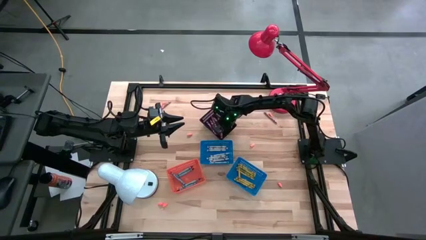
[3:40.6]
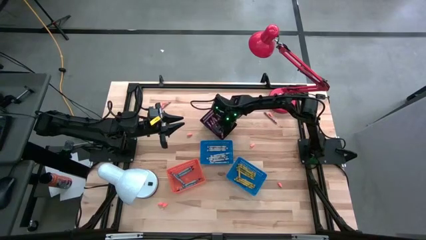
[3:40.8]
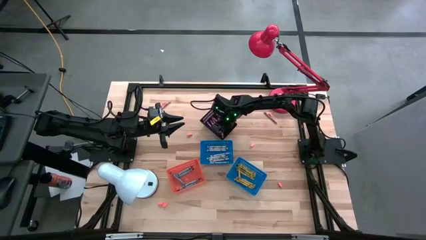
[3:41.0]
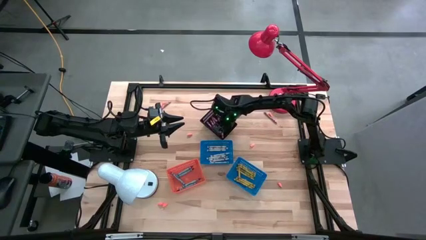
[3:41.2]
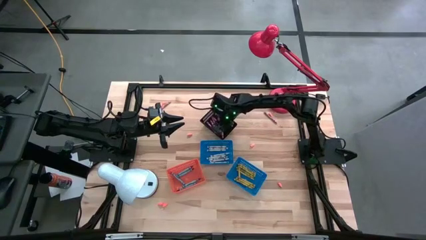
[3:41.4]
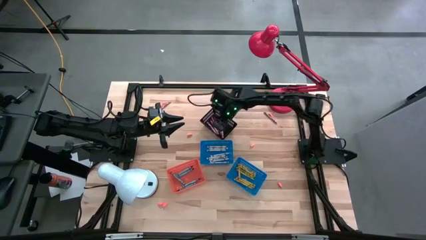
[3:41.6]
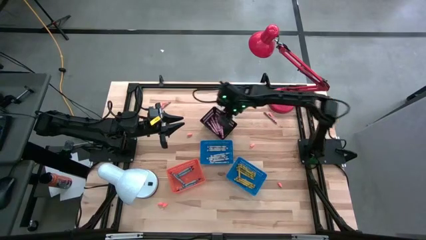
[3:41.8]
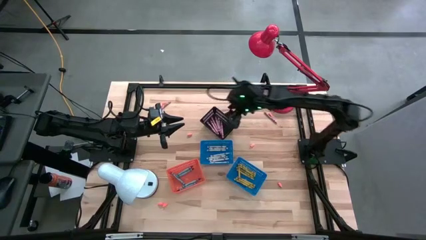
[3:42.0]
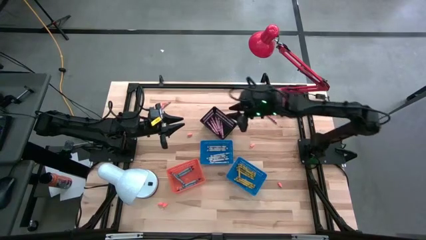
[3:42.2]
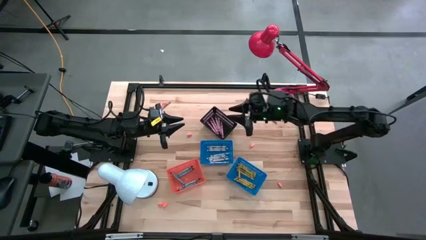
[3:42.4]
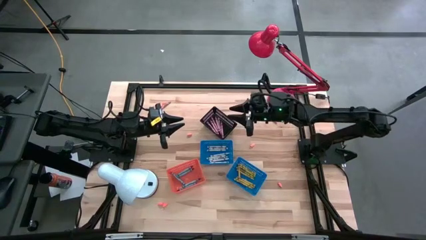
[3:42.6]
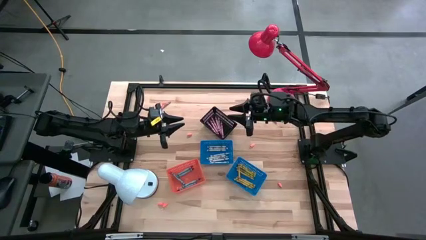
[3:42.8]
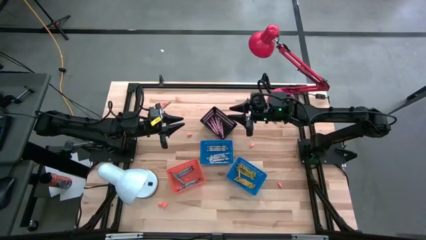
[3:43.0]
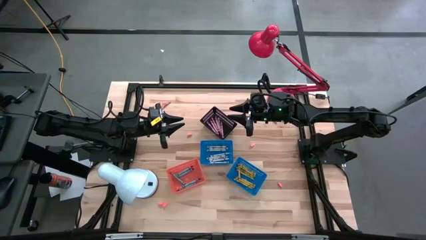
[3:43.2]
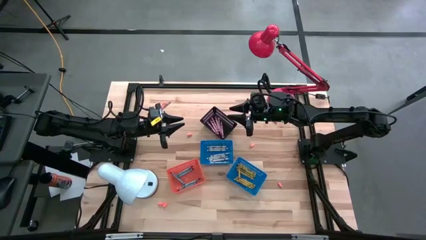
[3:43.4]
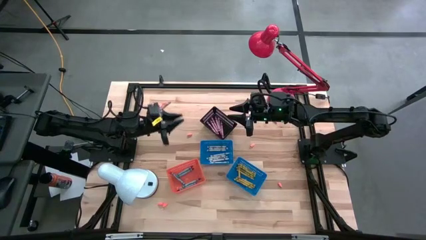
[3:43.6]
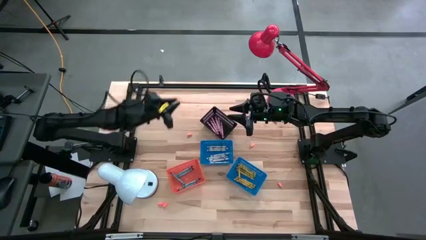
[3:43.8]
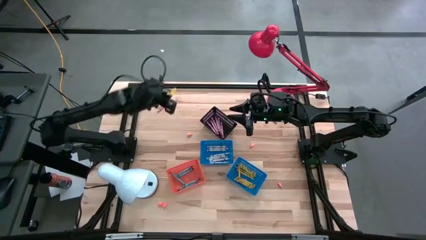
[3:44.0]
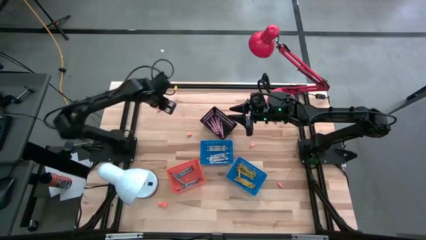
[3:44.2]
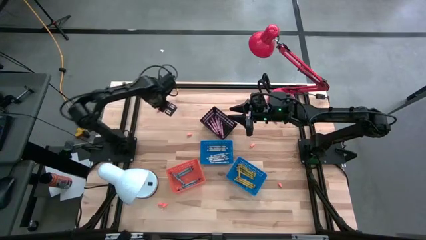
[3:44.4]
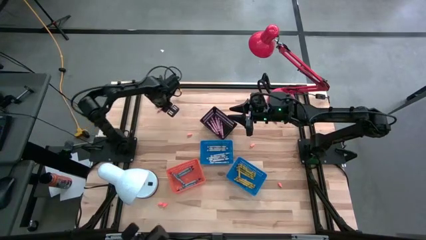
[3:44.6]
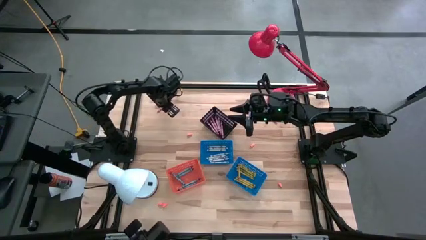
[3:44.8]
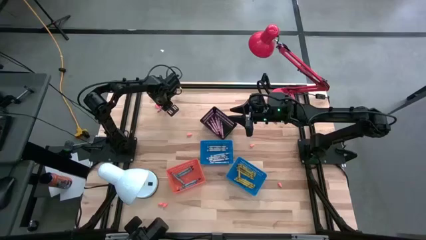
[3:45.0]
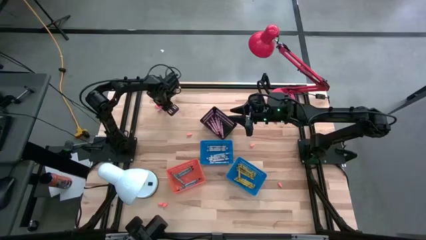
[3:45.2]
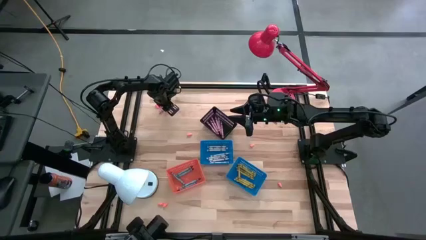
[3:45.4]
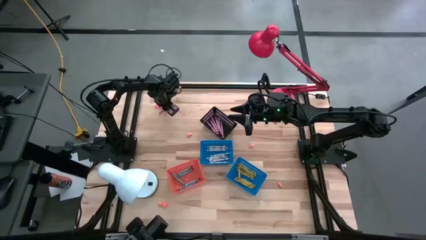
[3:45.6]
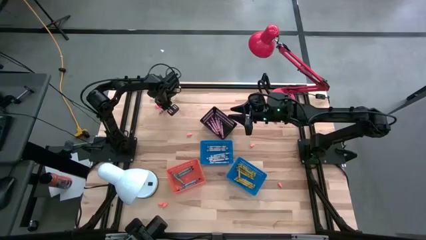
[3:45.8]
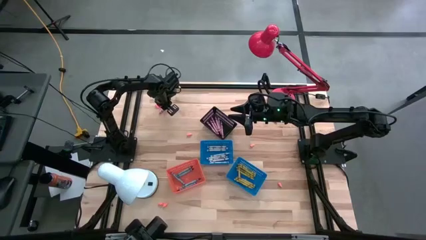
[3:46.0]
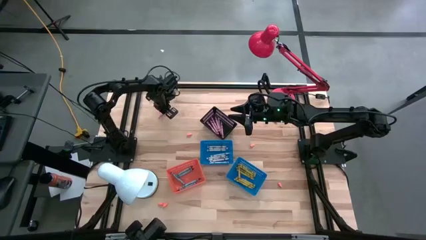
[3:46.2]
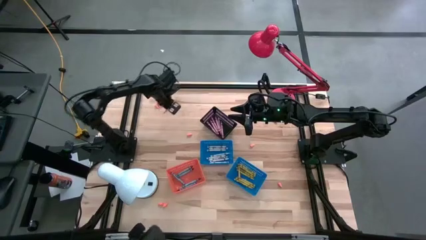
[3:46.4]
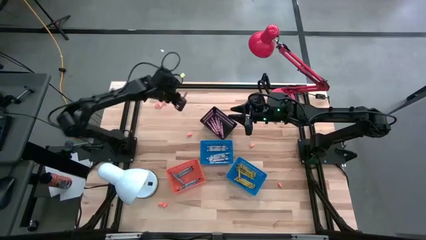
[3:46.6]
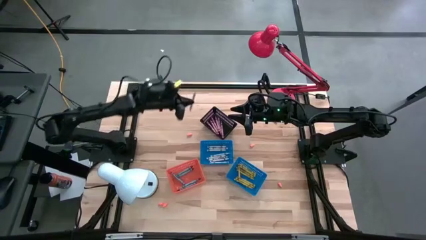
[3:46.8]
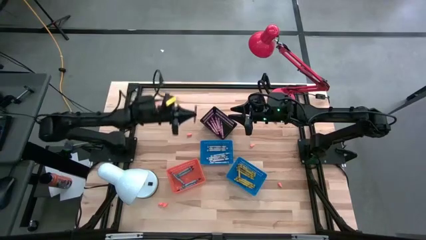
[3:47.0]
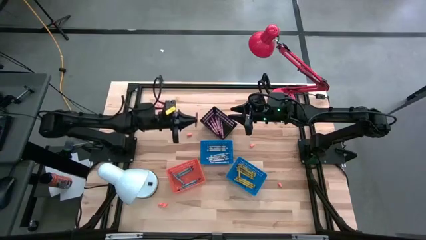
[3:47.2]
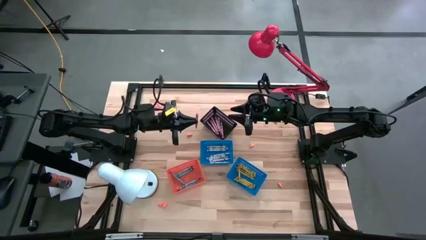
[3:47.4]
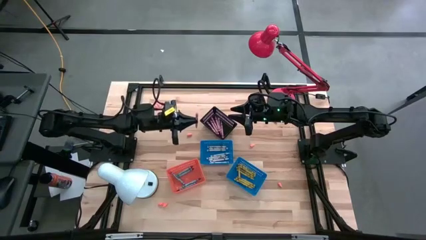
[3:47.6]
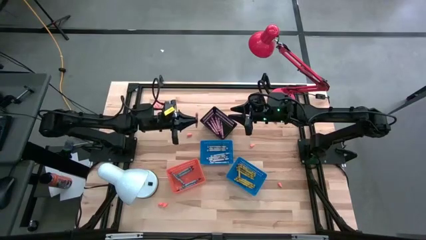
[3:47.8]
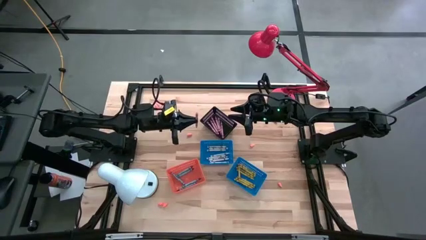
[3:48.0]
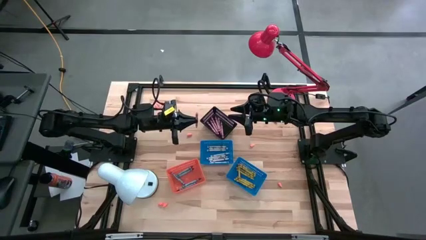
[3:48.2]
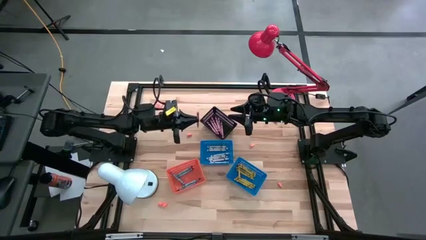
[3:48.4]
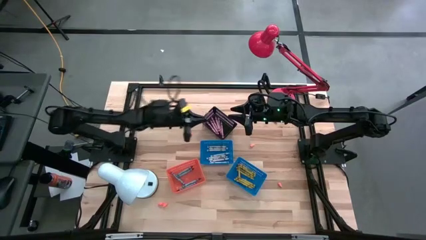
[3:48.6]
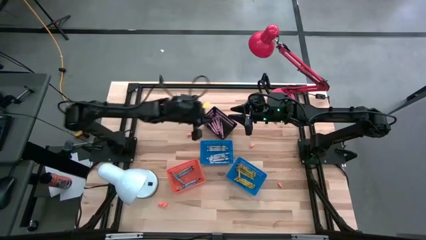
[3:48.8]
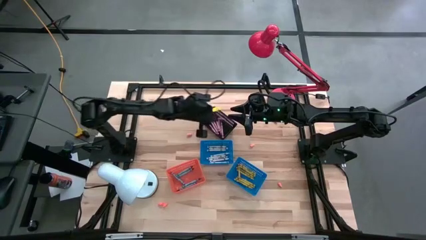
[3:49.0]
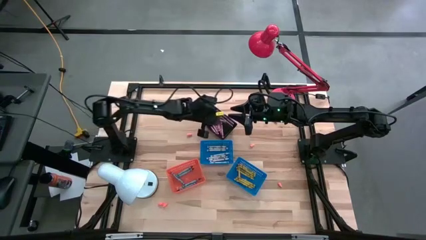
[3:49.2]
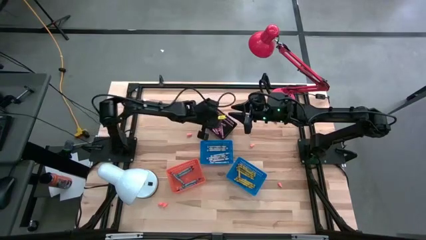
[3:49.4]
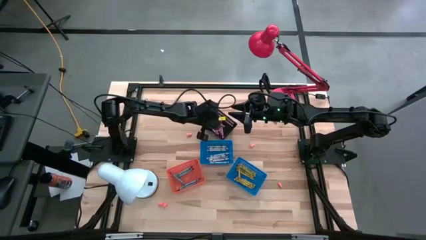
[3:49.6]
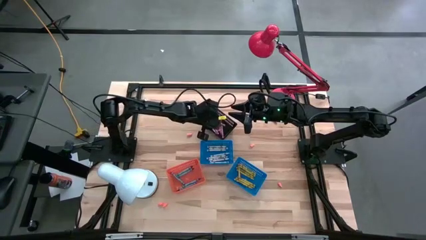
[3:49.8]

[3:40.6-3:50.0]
Task: Sort crayons
Put the pink crayon into the black bin

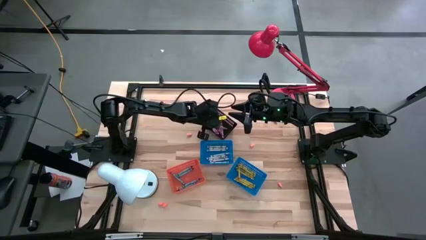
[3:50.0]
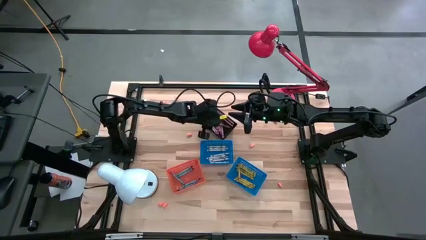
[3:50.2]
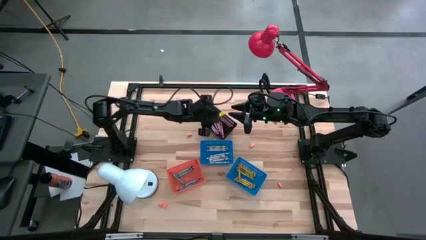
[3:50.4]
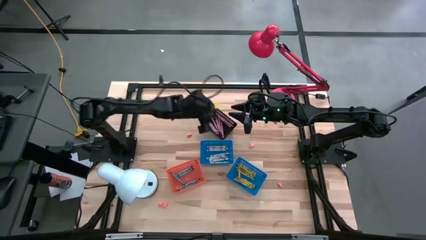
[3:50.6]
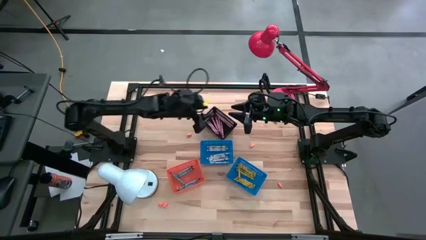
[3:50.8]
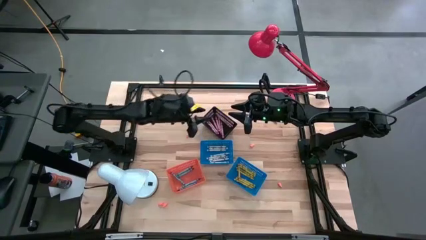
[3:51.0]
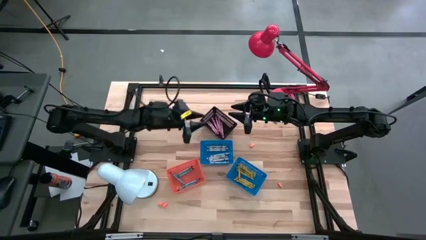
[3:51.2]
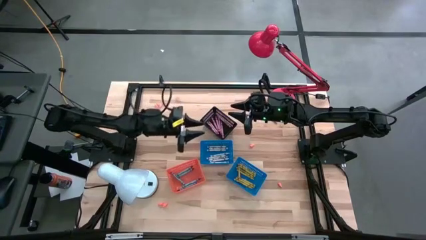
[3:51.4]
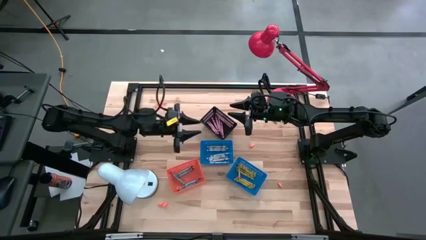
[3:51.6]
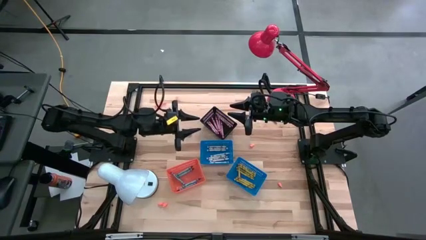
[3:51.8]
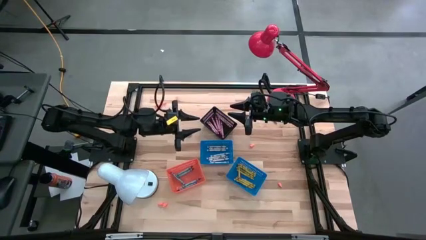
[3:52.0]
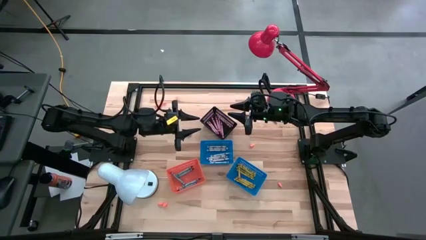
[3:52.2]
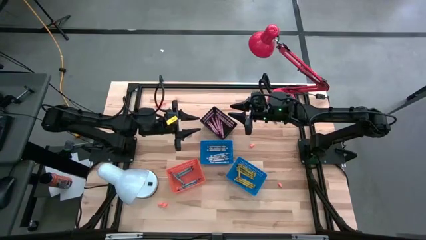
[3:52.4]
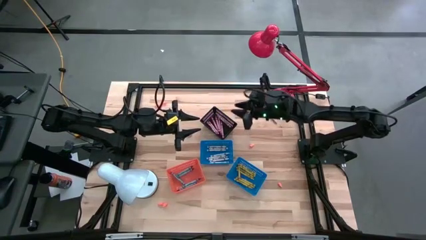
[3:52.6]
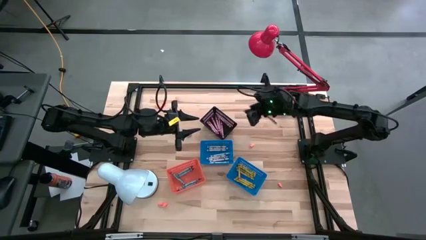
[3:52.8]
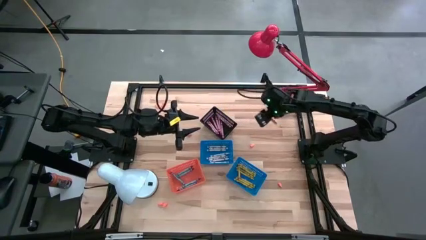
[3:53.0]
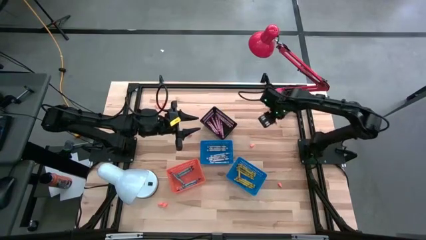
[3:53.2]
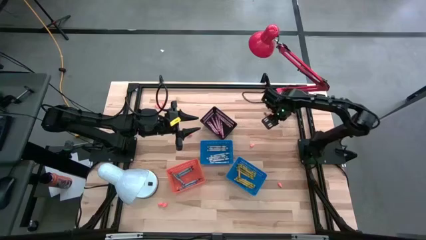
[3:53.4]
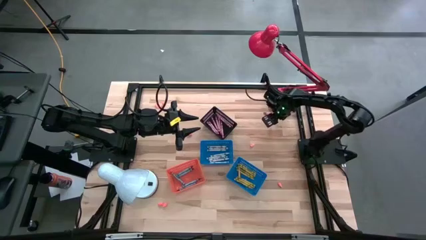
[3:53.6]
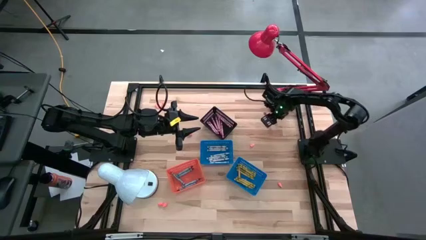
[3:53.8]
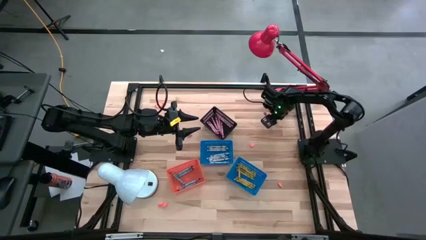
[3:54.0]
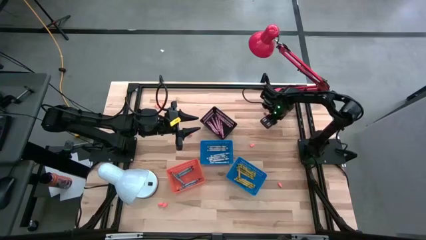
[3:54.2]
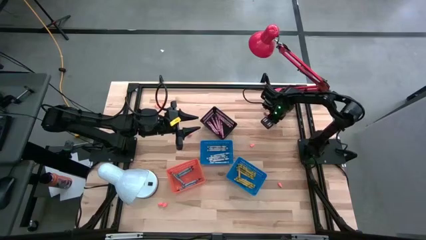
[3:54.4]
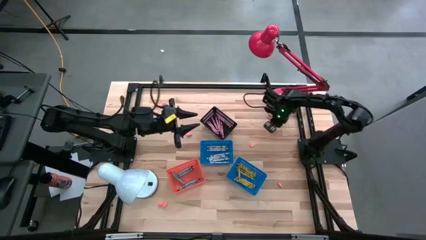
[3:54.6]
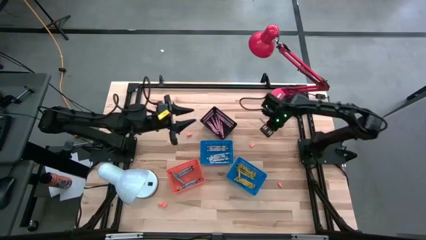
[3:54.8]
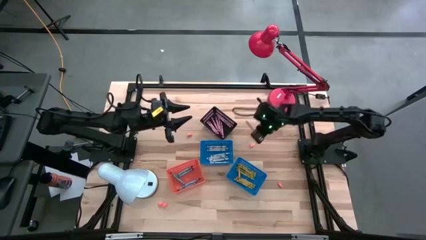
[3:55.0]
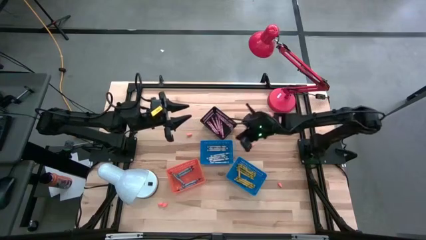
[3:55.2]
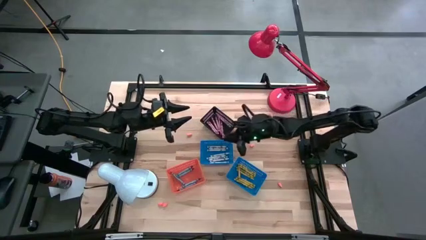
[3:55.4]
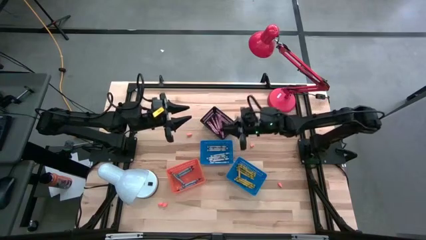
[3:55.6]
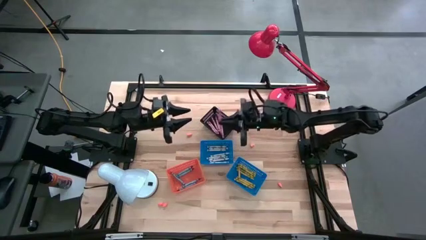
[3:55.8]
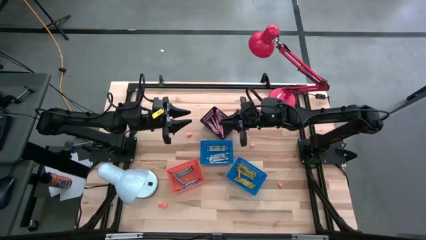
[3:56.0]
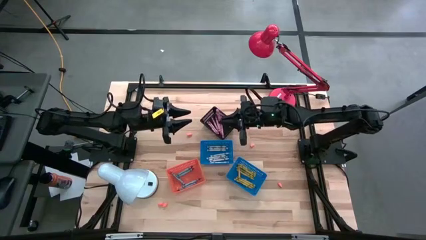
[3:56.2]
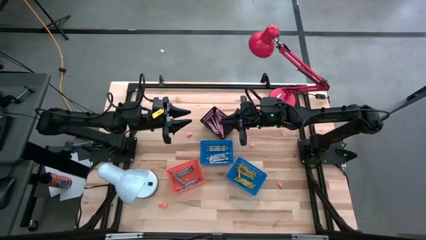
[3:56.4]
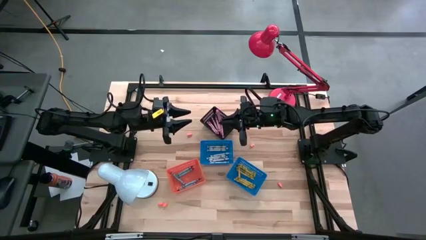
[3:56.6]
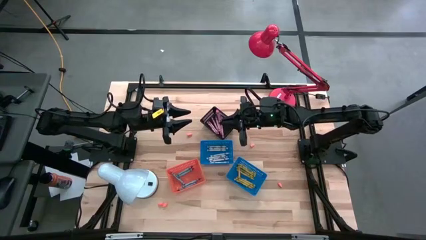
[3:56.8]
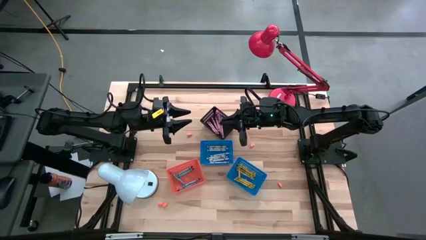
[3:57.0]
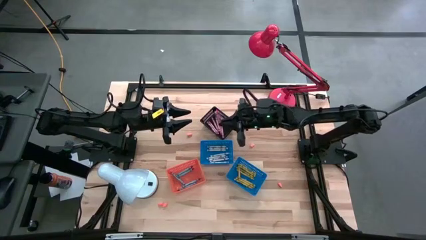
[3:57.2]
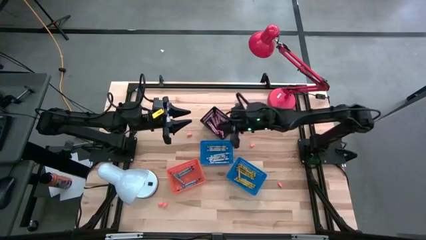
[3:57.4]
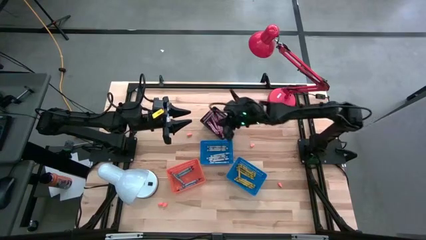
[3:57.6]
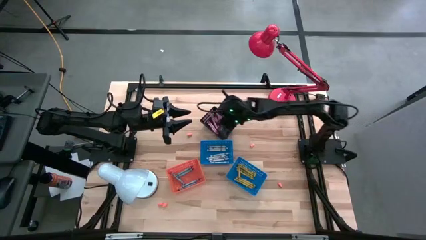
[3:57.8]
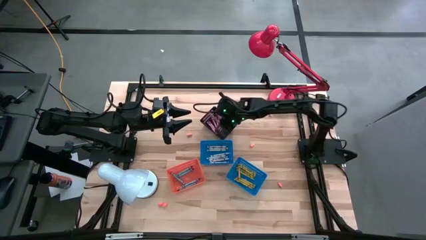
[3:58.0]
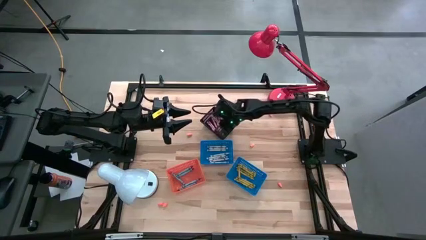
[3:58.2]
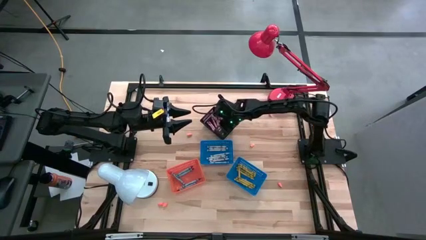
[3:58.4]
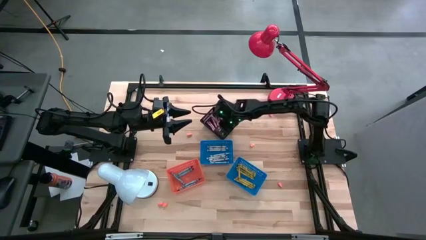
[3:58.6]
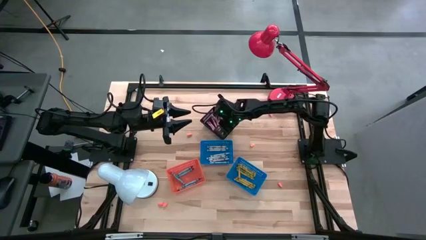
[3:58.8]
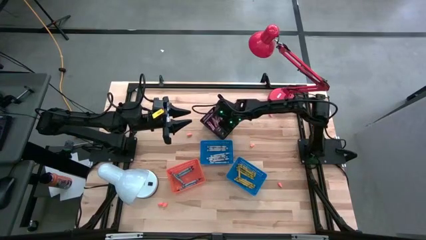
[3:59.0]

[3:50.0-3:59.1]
Put the pink crayon into the black bin
